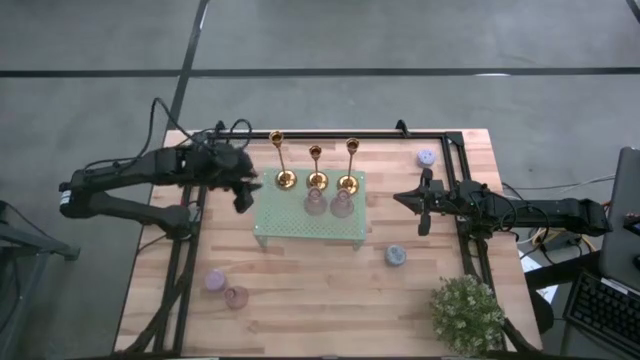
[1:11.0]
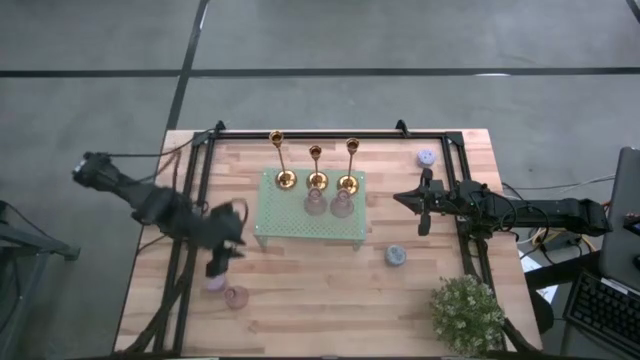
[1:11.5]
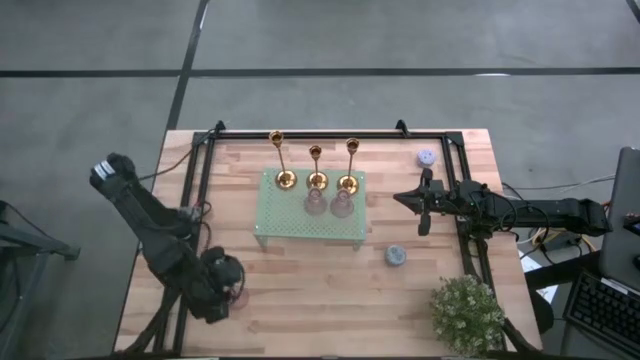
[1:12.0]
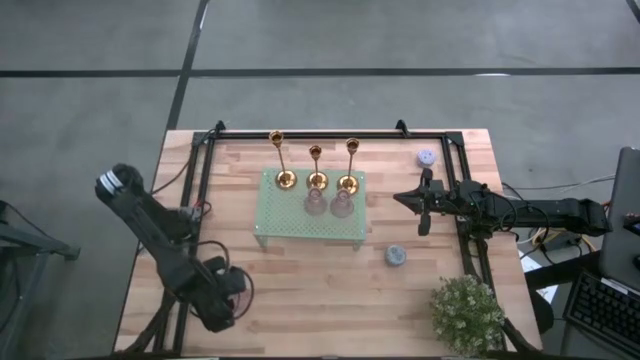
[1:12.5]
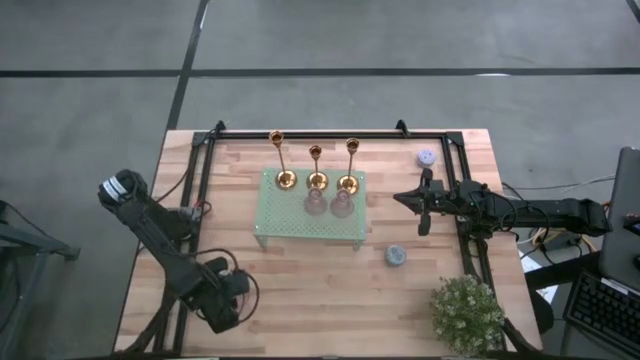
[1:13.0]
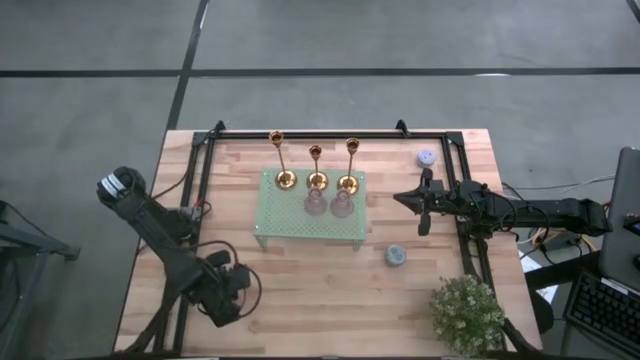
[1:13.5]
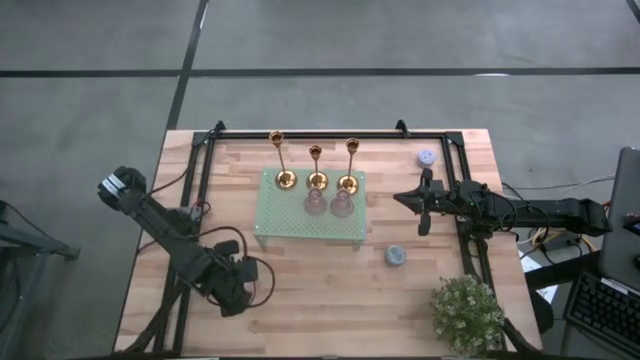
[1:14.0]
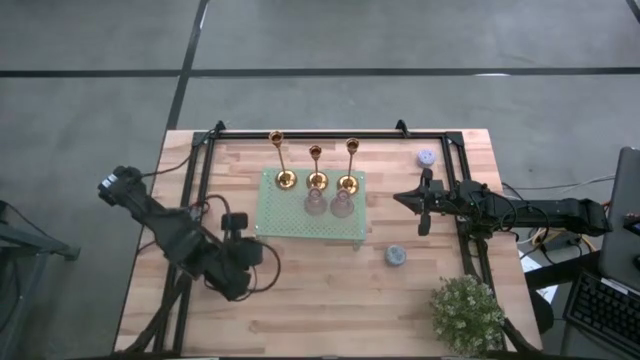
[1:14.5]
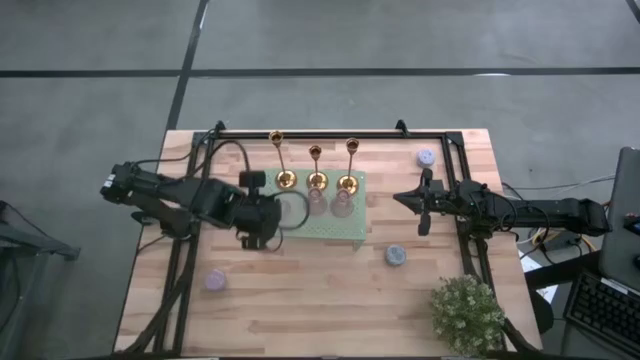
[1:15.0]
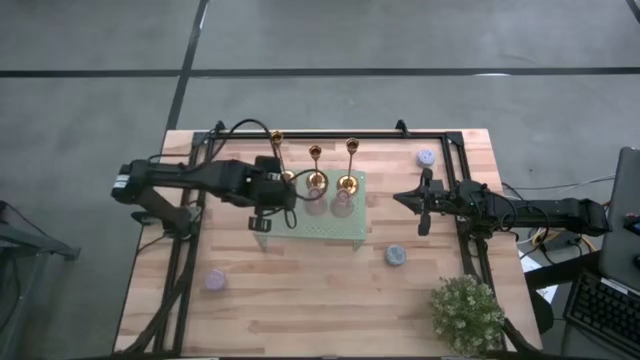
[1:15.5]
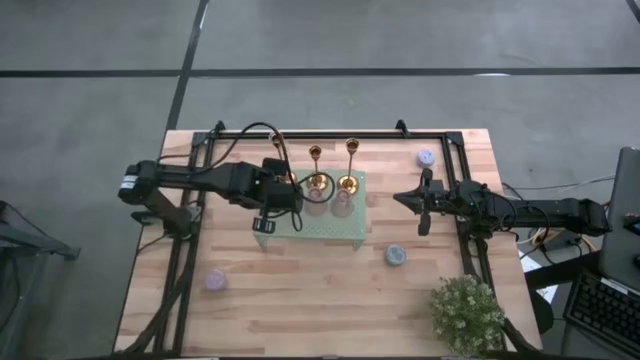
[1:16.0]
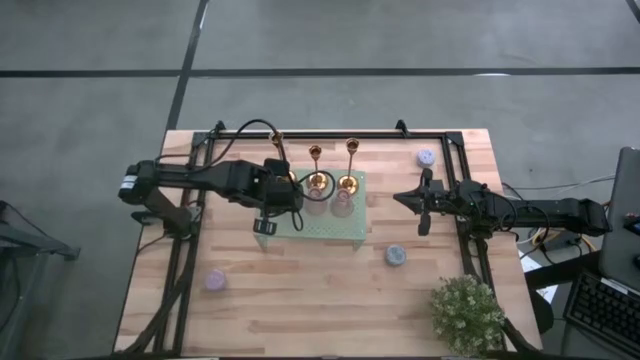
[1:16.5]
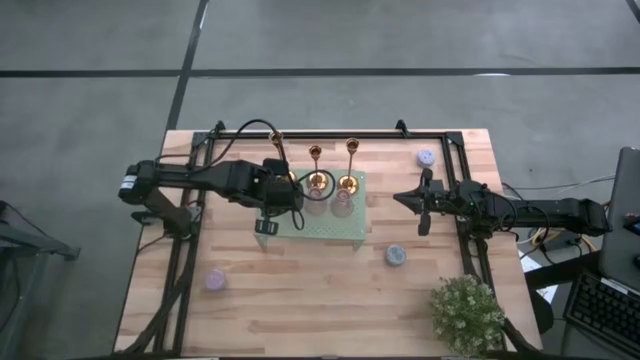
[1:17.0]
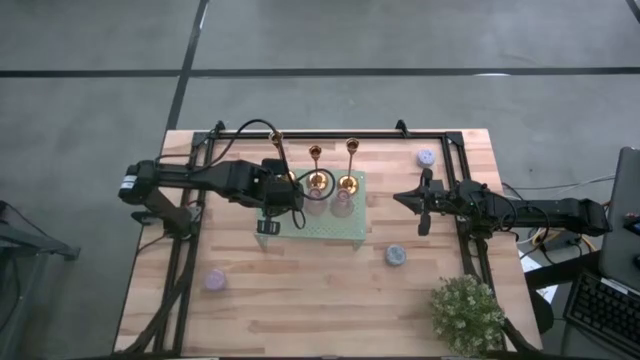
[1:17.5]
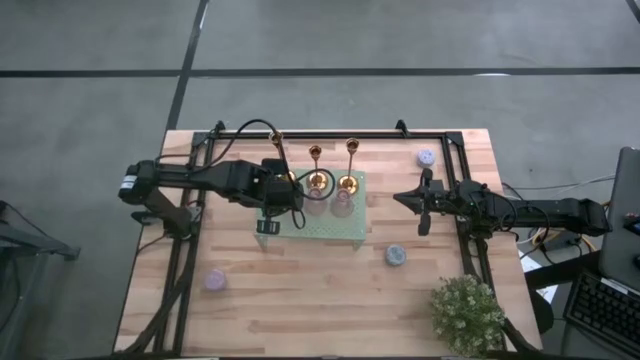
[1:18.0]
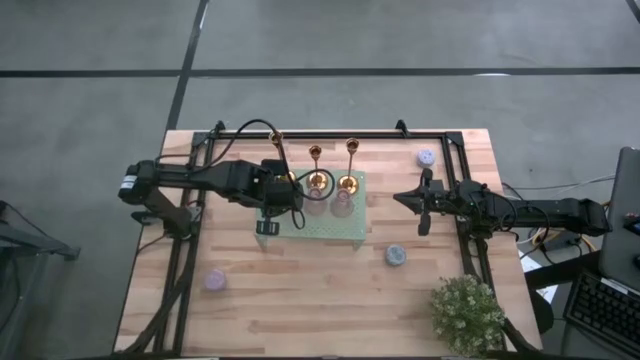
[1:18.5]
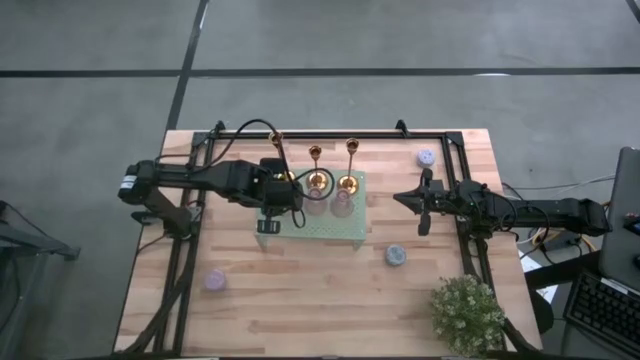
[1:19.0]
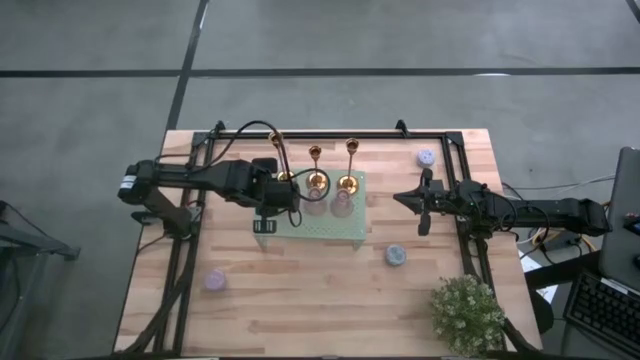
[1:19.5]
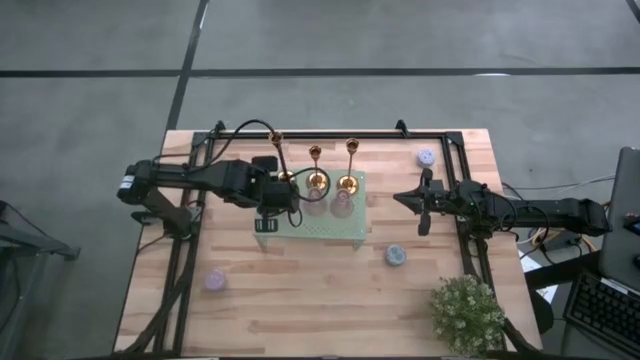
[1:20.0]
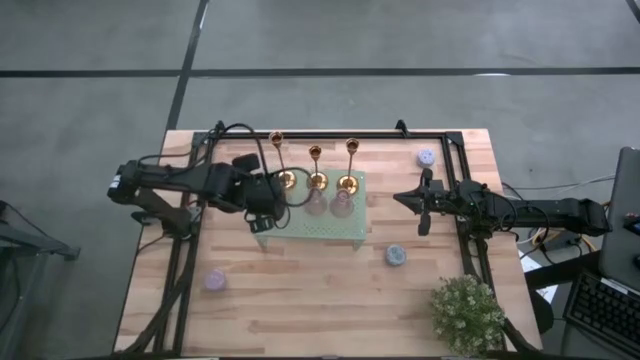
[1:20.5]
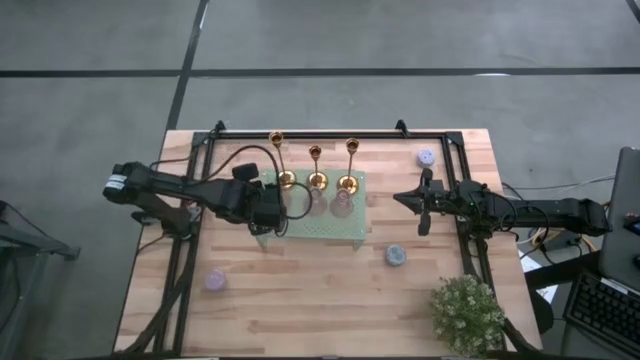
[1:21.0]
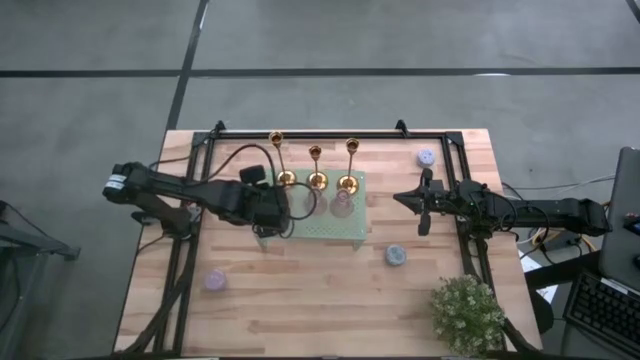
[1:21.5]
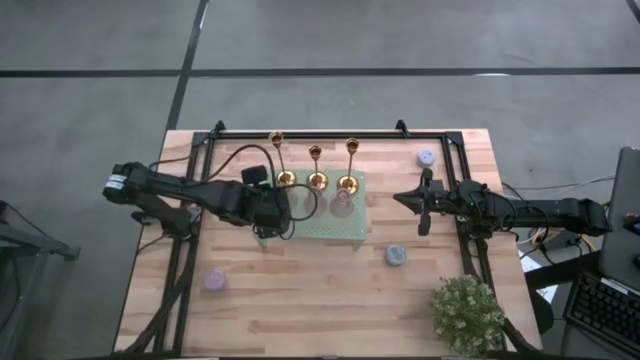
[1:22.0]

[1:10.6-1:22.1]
Task: Pick & Place candle stick holders
Put the transparent glass candle holder on the shelf aligned with the other transparent glass candle holders

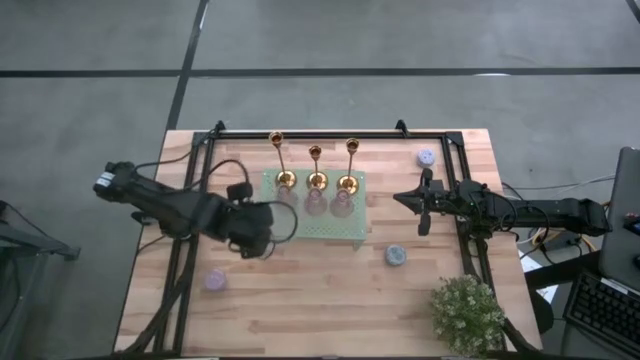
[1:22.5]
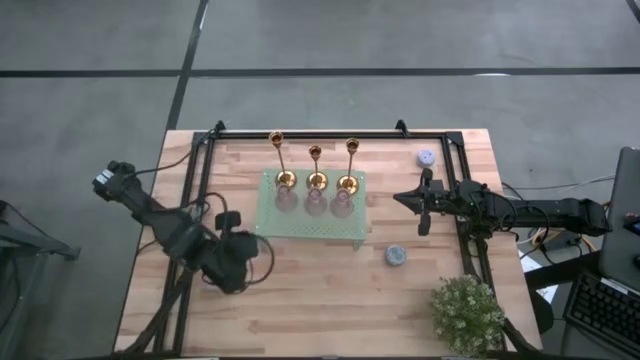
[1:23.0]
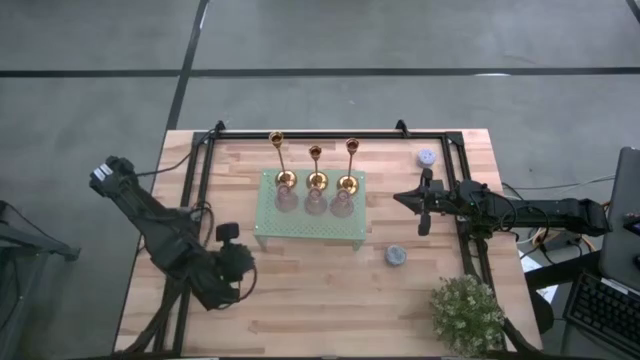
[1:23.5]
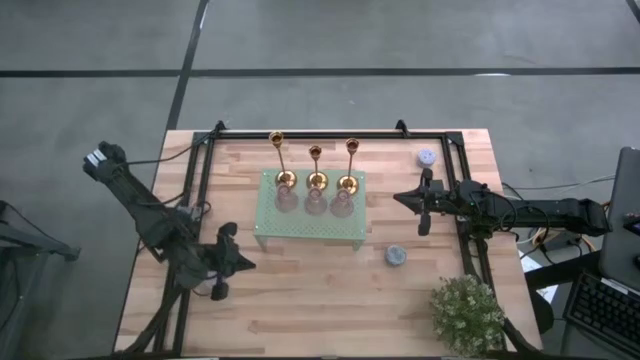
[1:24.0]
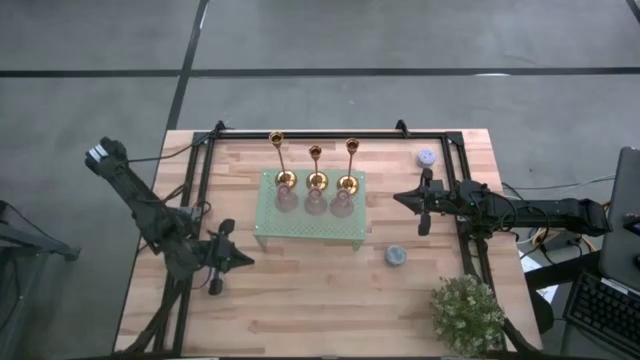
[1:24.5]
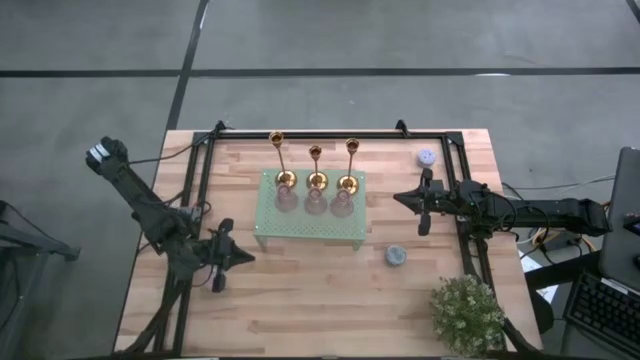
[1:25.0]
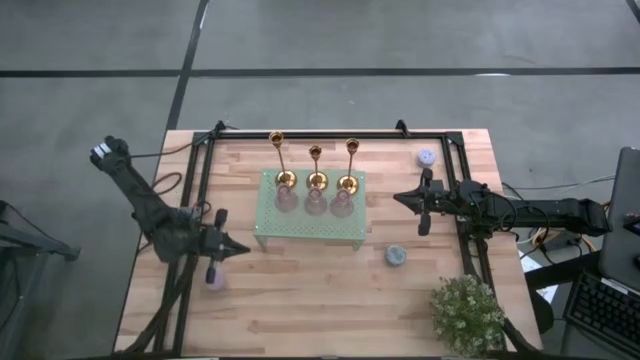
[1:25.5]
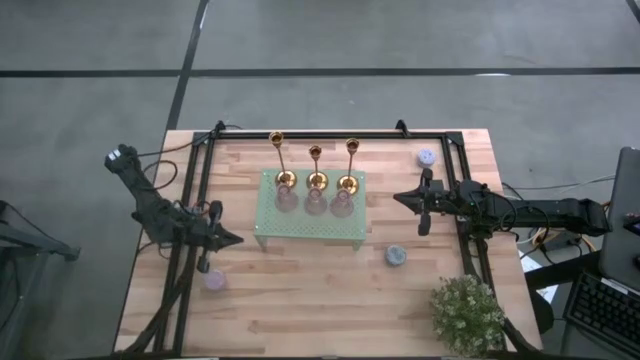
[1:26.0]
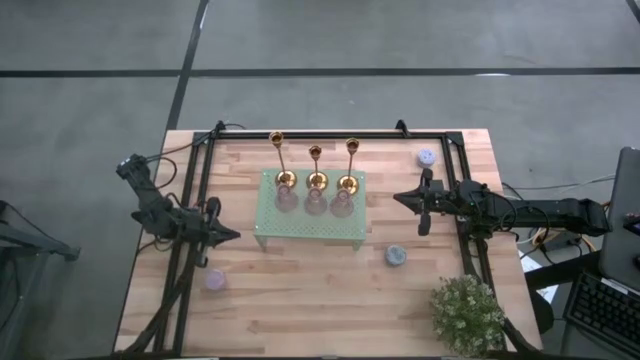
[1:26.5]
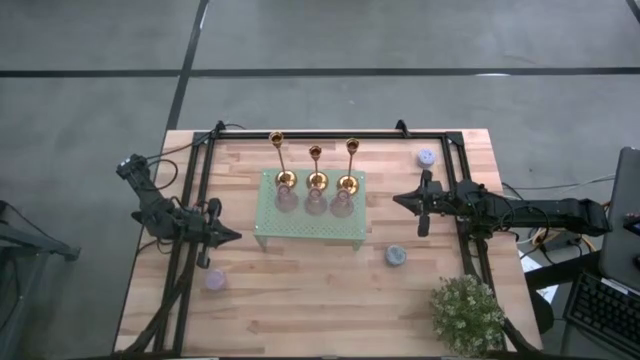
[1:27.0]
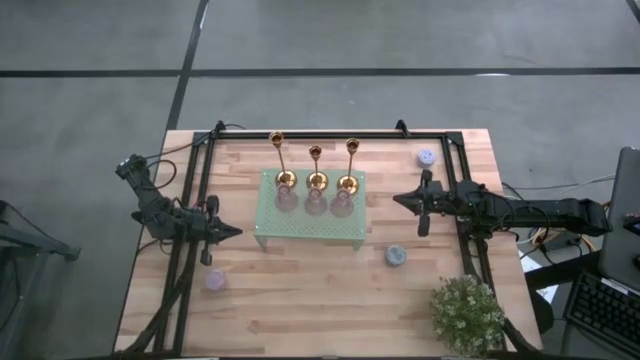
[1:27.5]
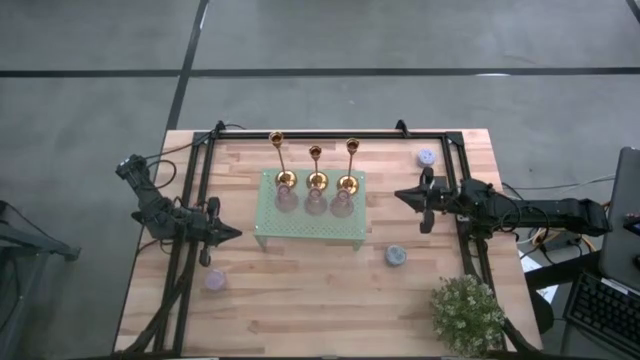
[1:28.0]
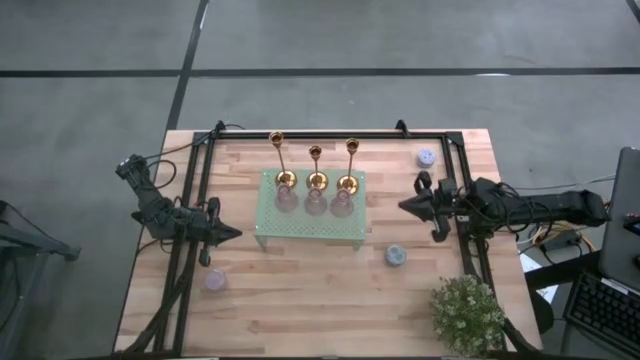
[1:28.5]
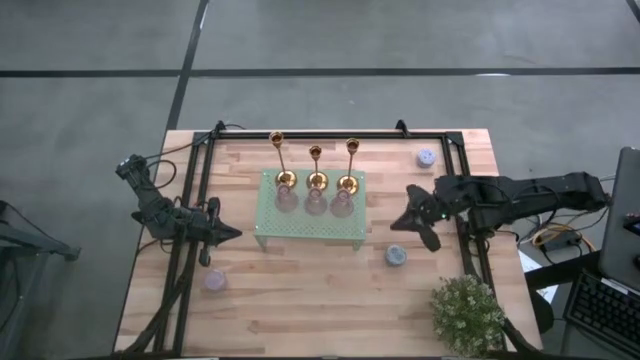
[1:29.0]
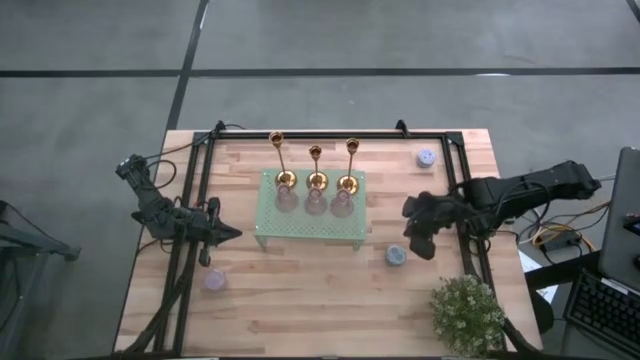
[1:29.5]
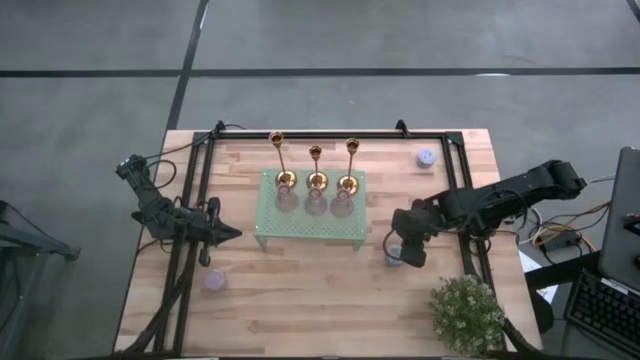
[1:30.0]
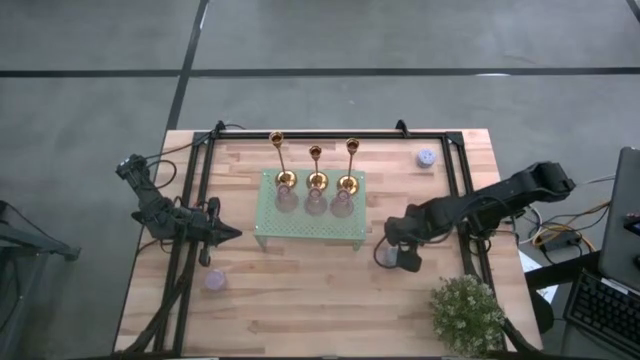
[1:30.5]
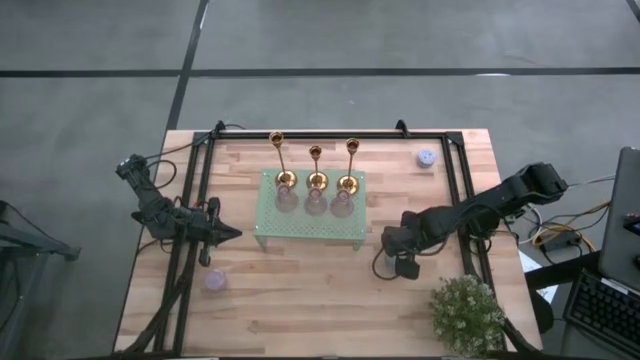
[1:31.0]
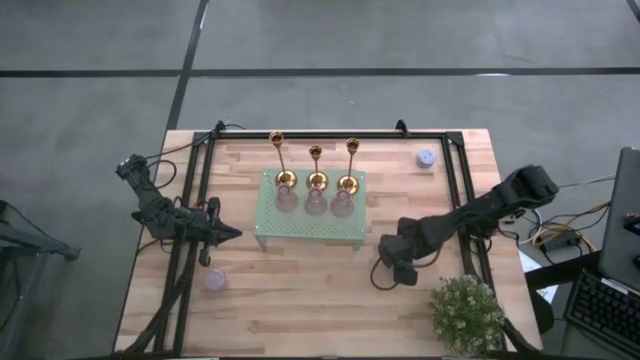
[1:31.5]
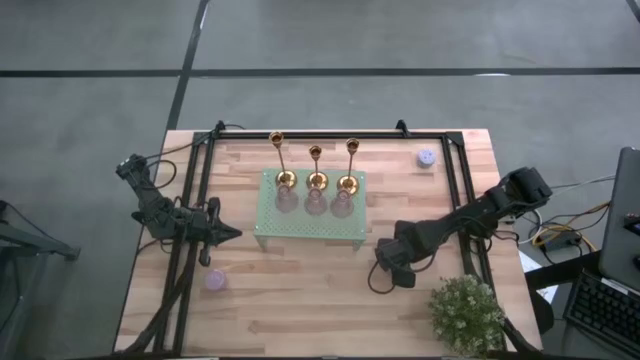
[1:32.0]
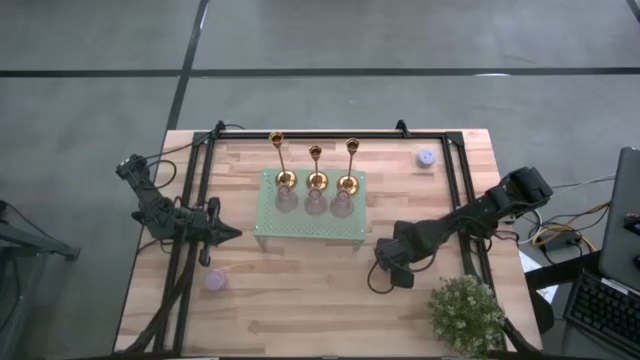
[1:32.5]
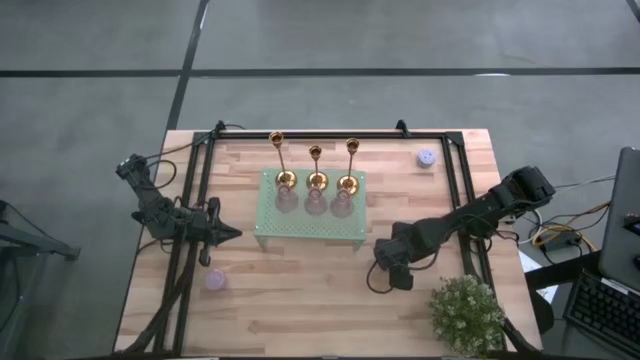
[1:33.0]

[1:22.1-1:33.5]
Put the blue scented candle on the shelf
